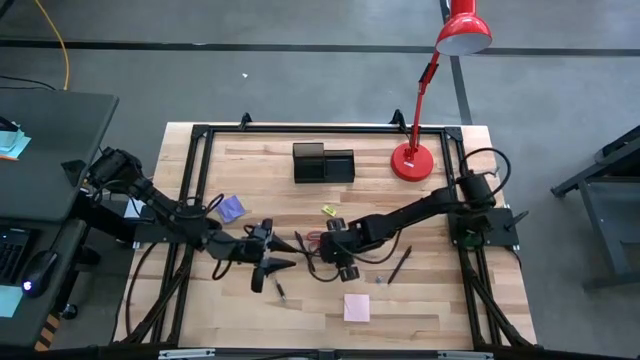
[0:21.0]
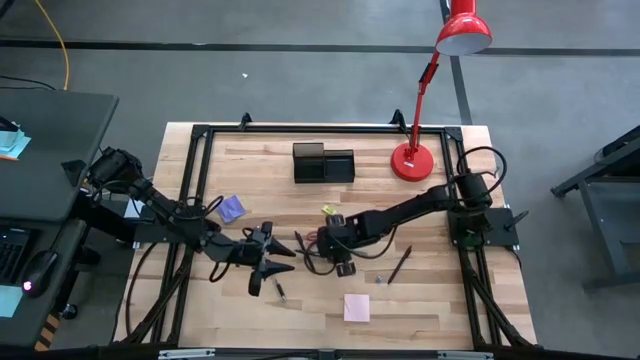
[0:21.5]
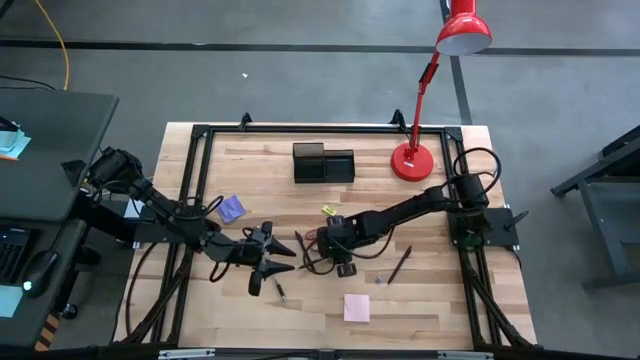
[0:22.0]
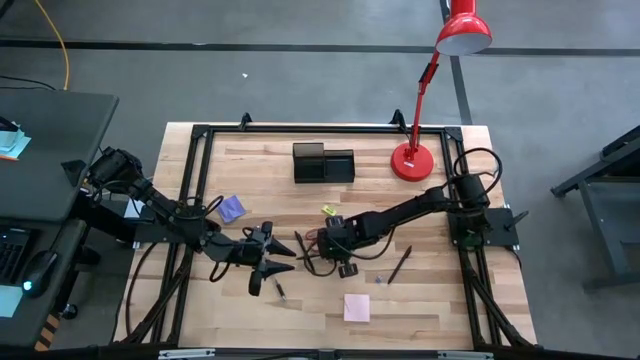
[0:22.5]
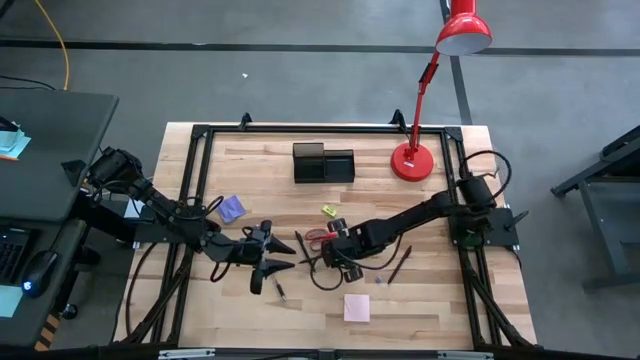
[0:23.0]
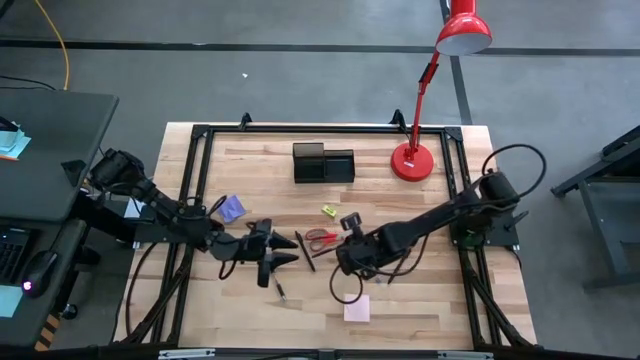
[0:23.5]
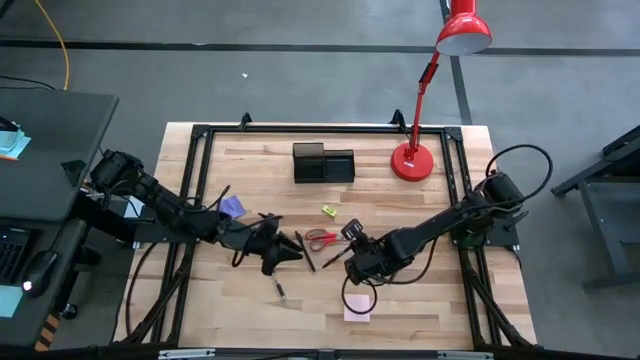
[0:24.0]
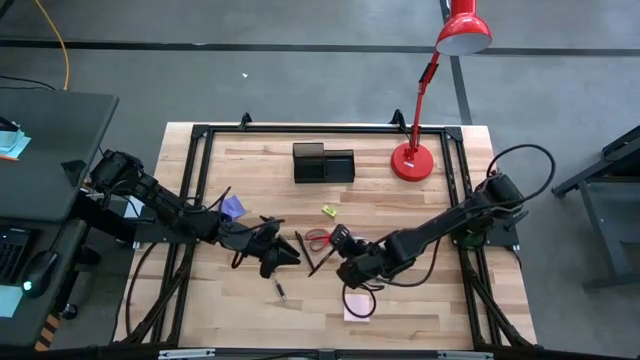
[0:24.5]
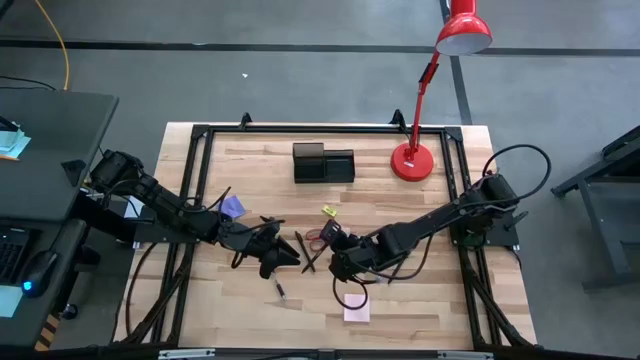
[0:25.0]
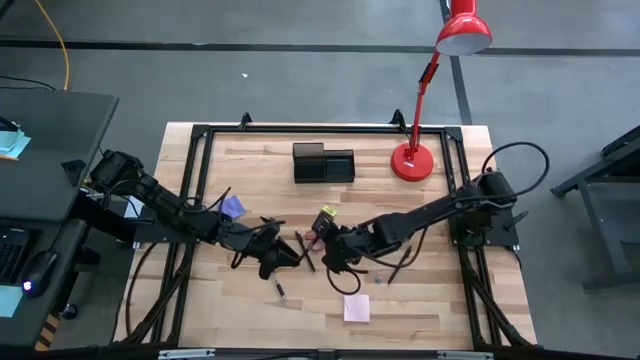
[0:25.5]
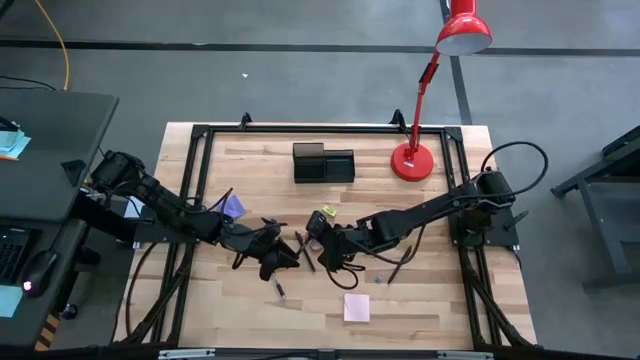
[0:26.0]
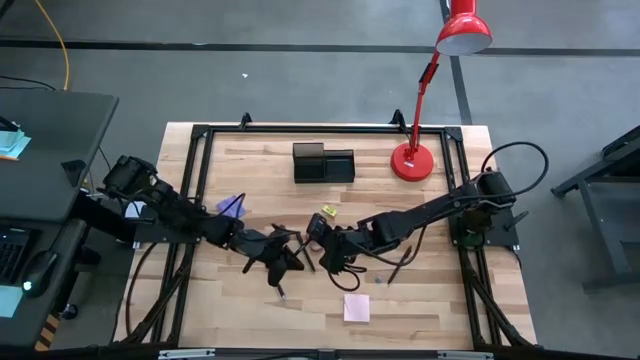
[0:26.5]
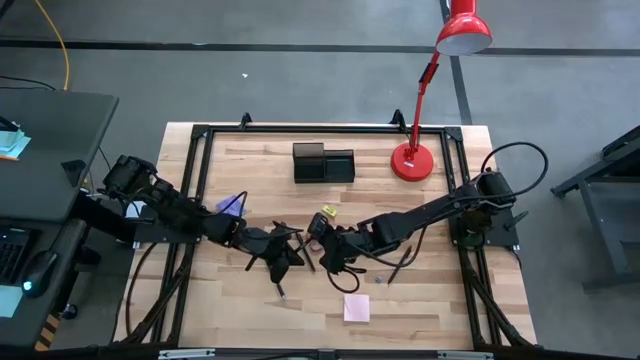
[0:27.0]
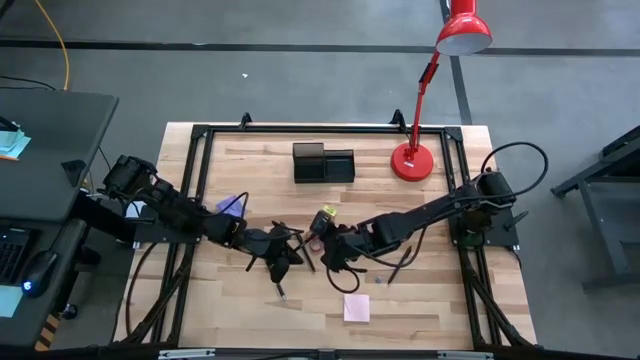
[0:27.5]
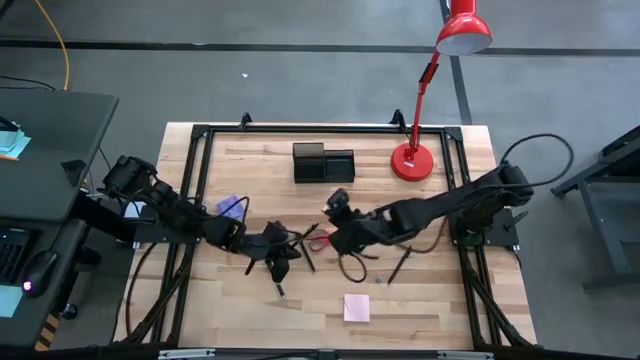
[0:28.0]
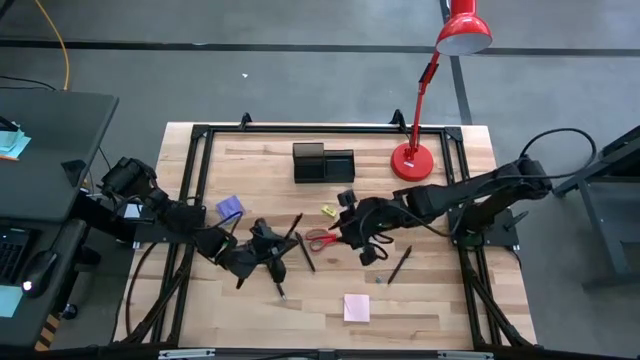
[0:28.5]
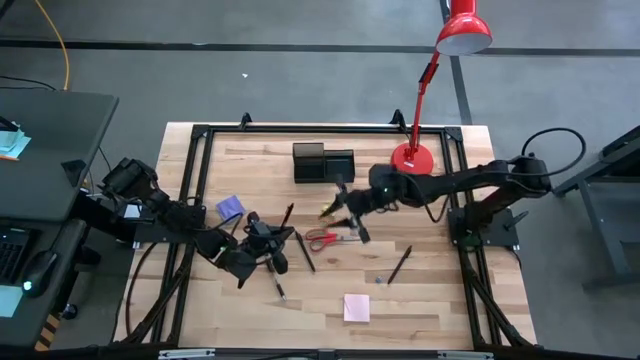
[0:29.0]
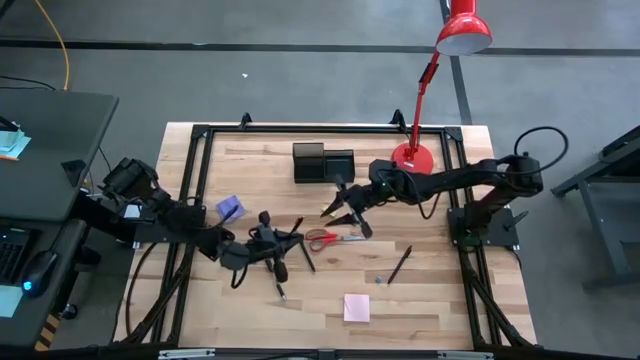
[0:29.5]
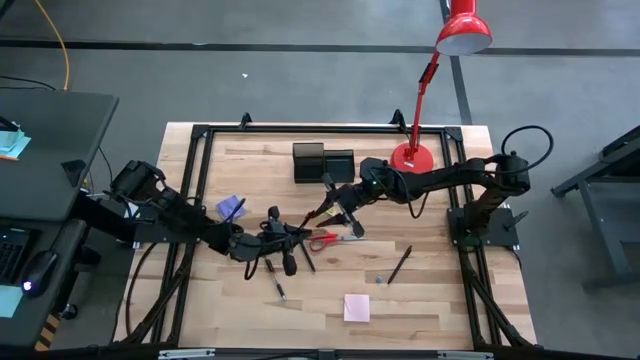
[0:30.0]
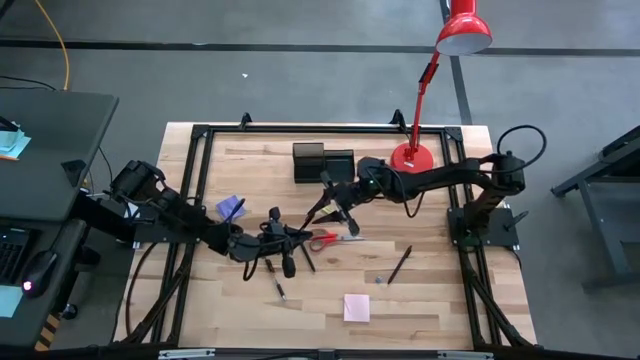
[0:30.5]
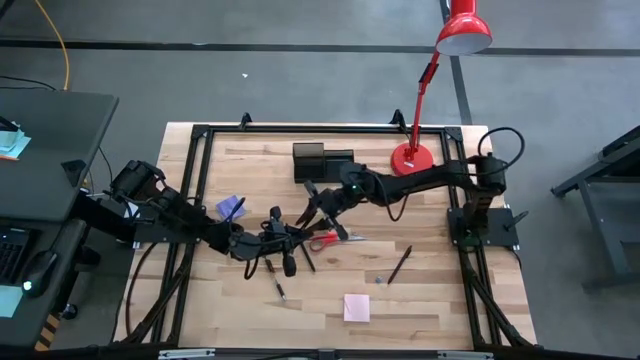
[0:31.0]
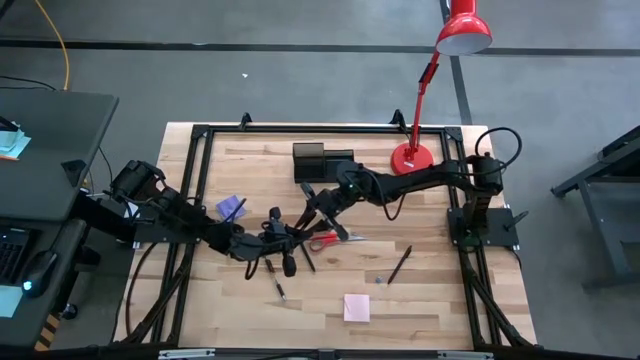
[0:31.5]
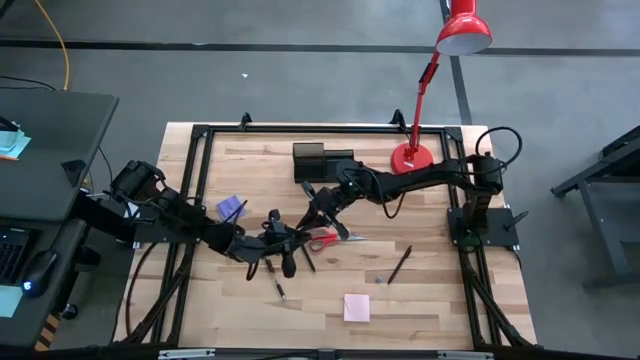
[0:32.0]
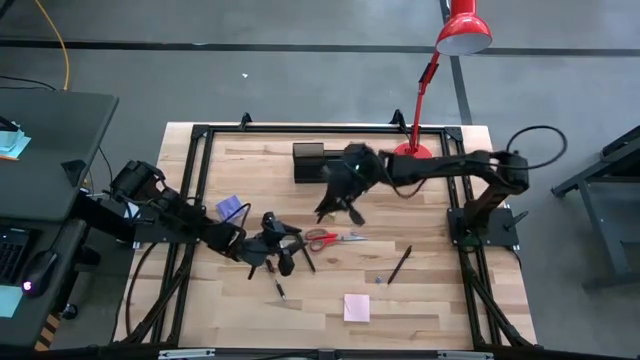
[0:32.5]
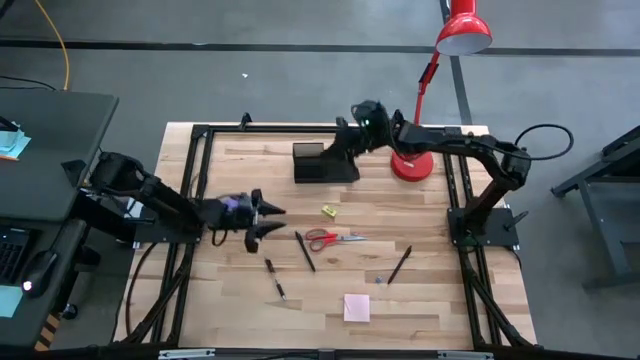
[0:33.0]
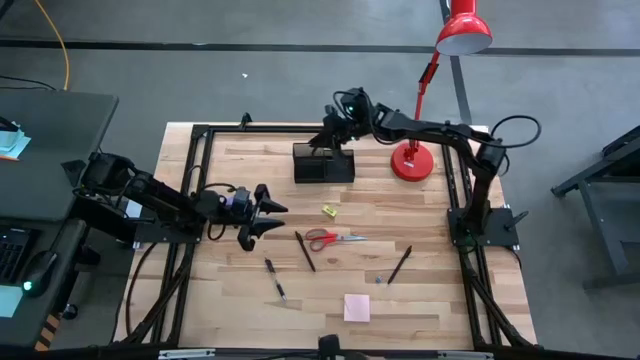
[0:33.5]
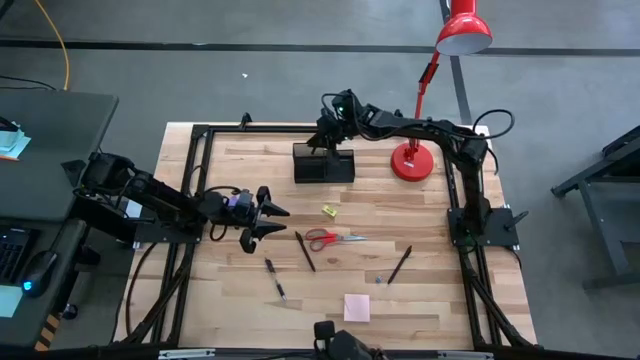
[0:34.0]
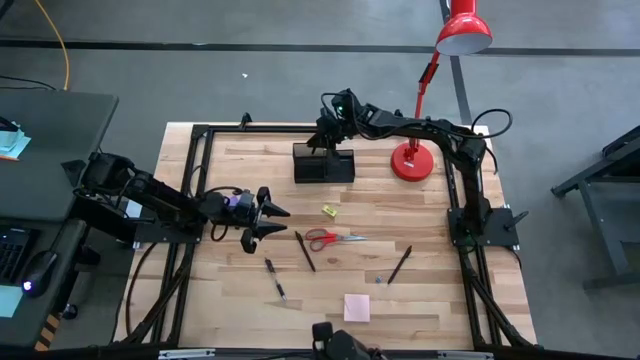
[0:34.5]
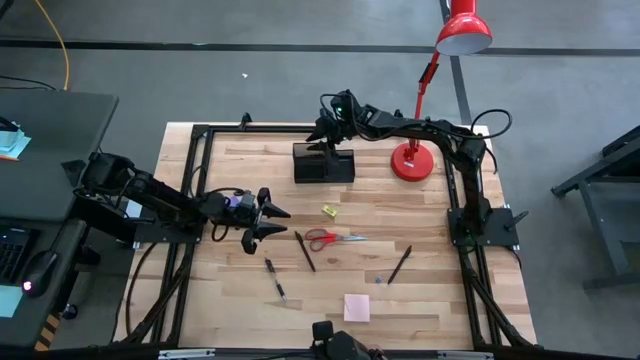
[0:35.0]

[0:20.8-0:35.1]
Task: Pick and place office supplies into organizer
Put the middle black pen into the desk organizer

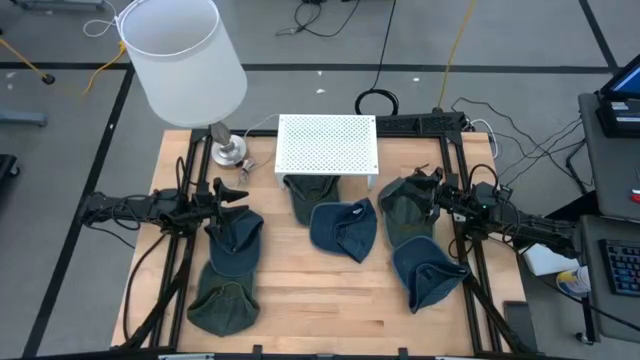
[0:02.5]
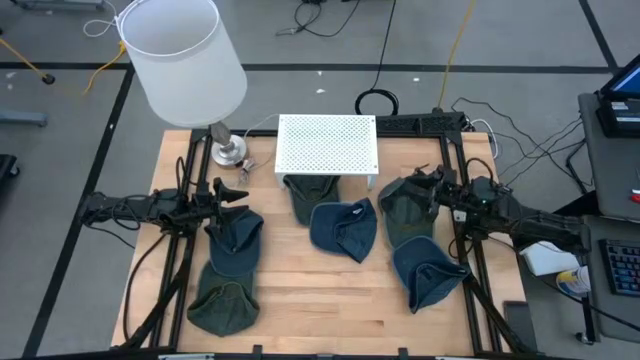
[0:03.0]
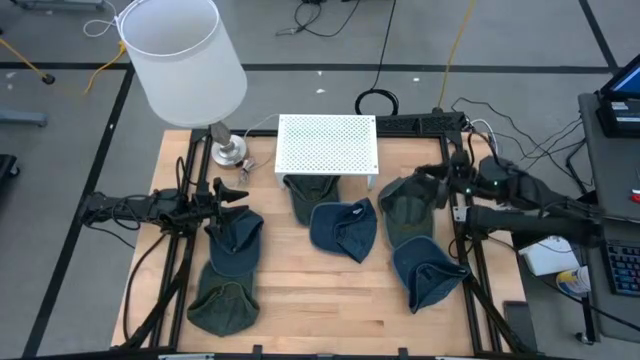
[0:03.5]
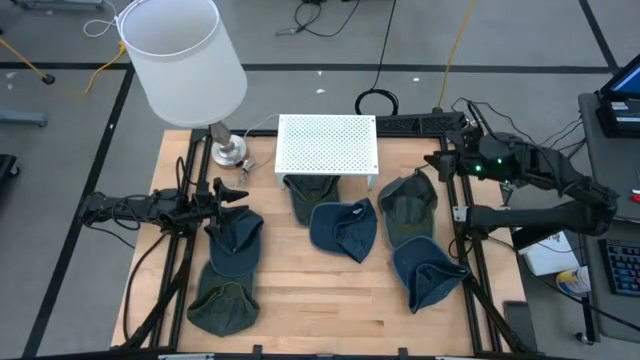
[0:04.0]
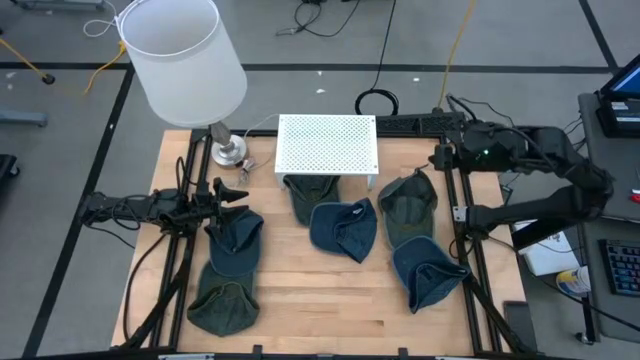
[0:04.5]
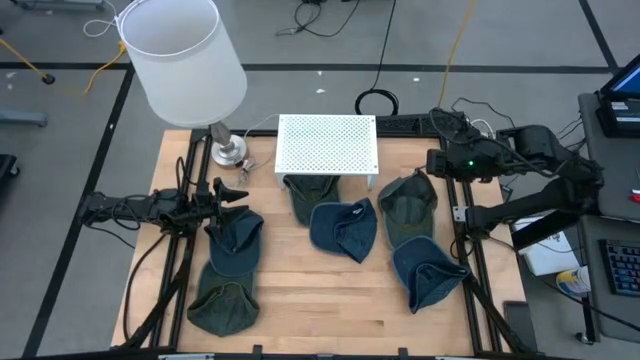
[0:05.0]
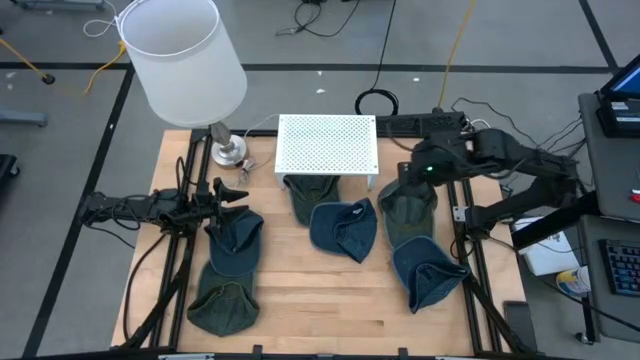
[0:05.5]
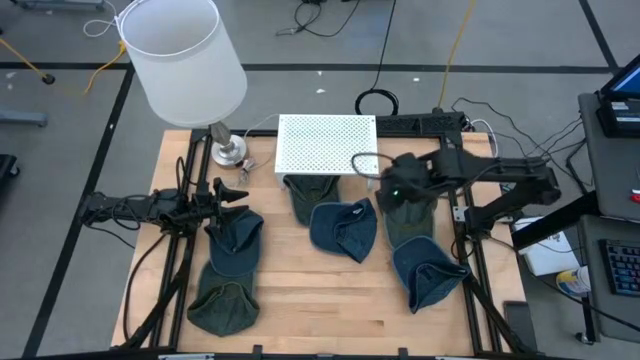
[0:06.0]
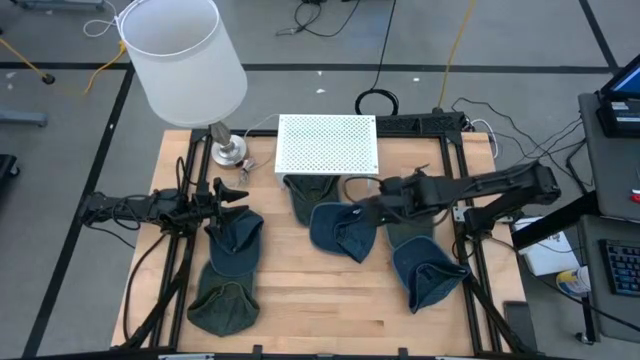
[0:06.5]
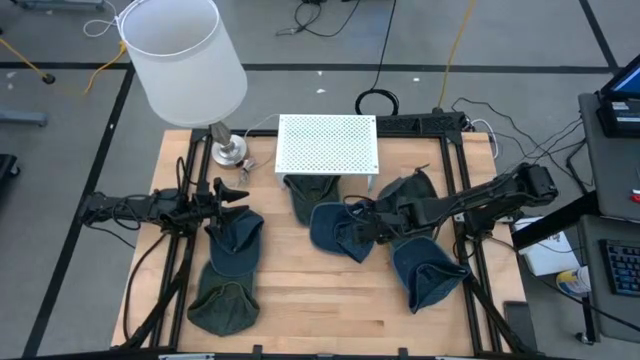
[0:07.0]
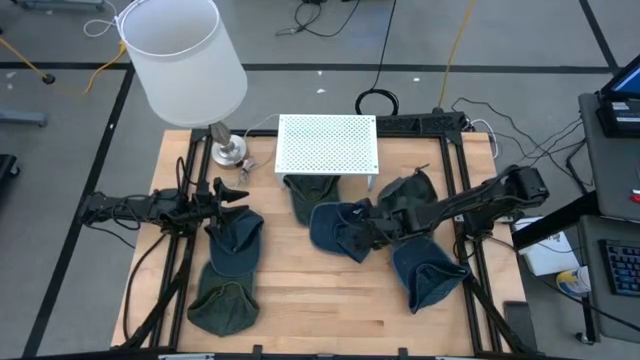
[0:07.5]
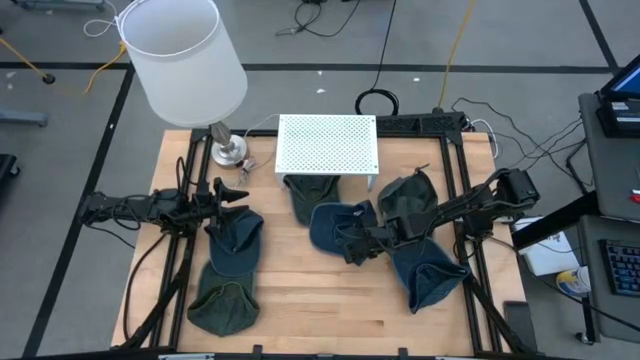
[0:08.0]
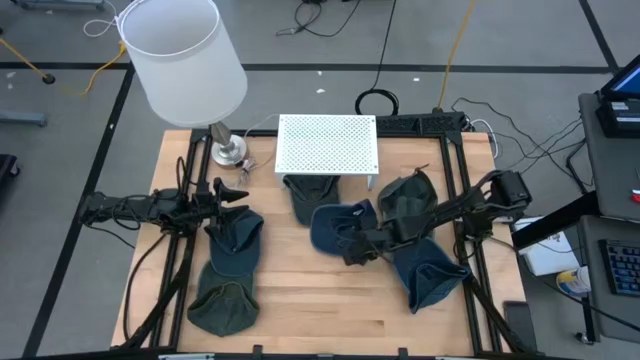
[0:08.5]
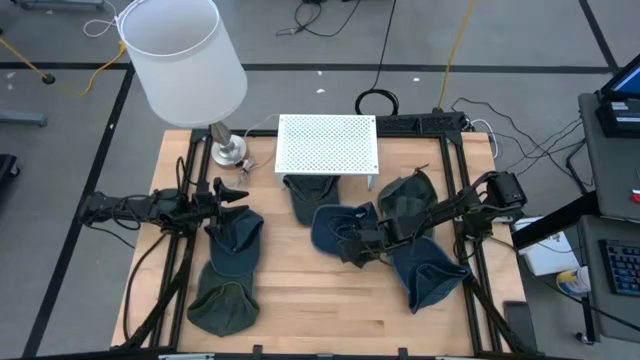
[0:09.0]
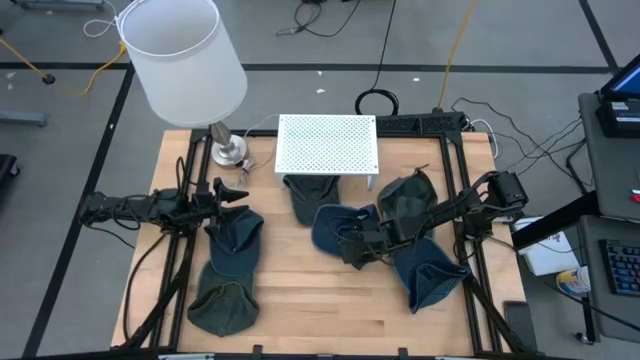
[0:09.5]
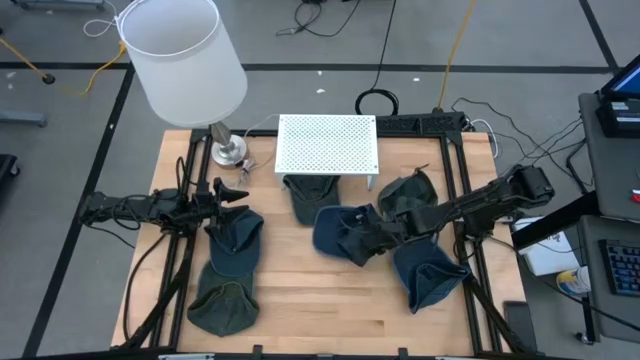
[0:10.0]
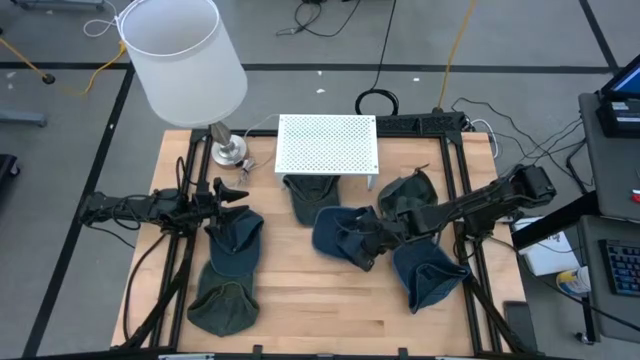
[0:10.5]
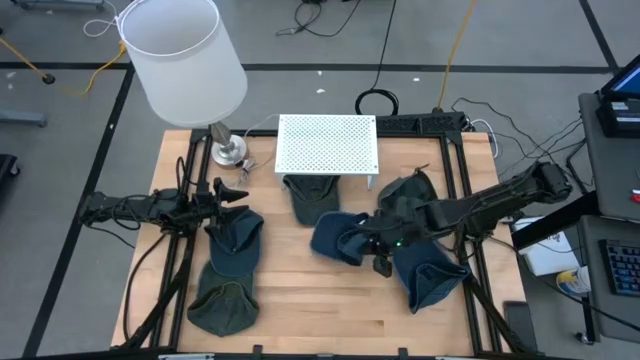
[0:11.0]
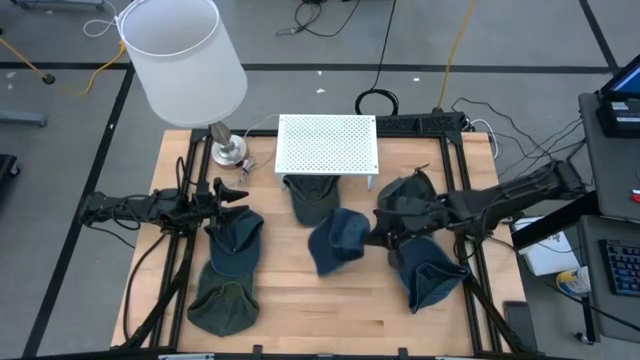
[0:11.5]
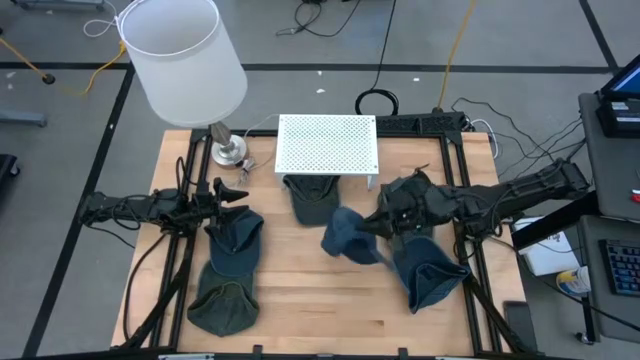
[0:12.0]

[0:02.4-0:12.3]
Task: Pick & Place hat
Put the middle blue cap on the shelf
